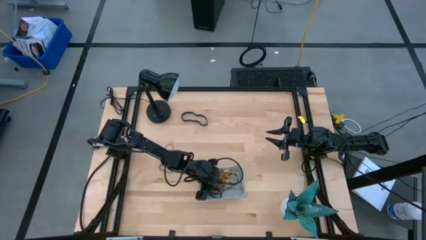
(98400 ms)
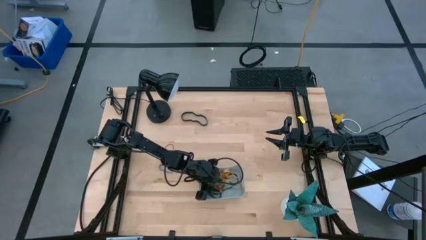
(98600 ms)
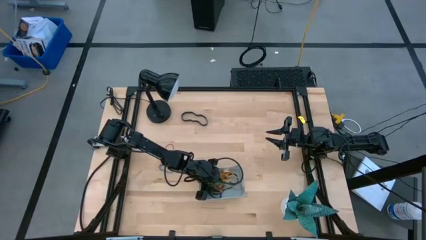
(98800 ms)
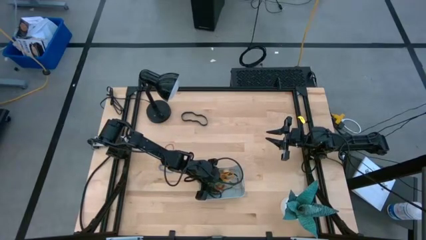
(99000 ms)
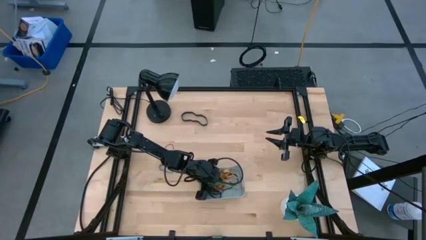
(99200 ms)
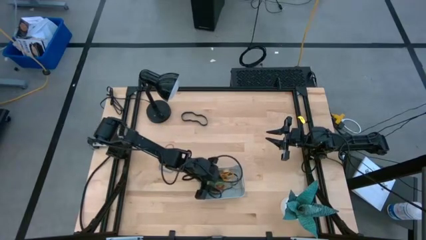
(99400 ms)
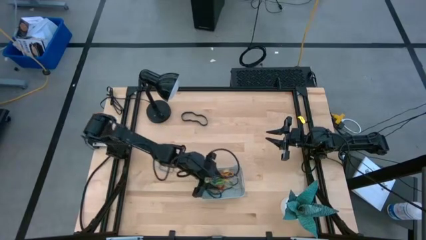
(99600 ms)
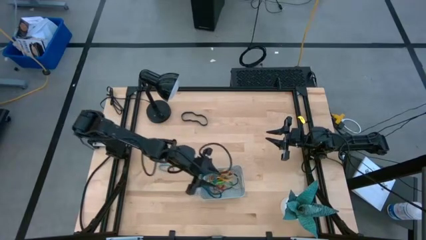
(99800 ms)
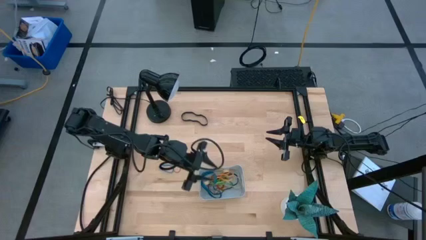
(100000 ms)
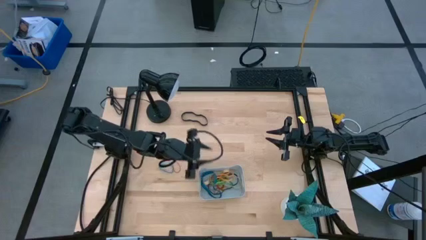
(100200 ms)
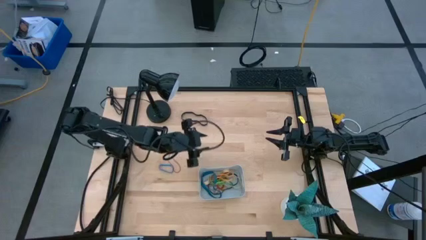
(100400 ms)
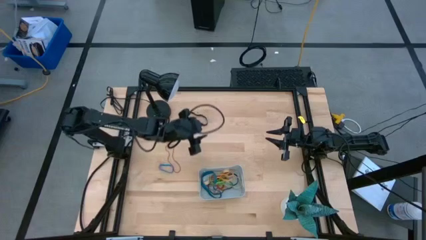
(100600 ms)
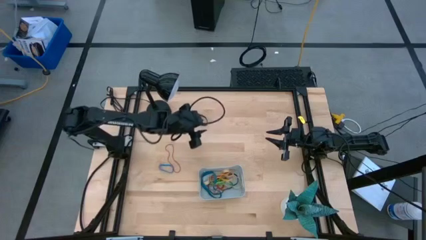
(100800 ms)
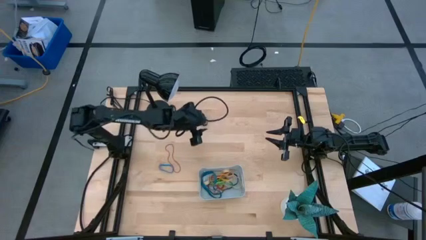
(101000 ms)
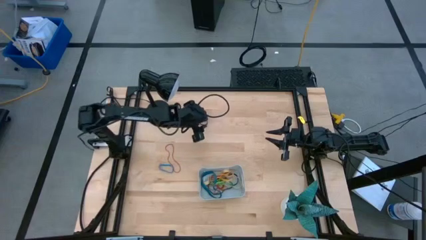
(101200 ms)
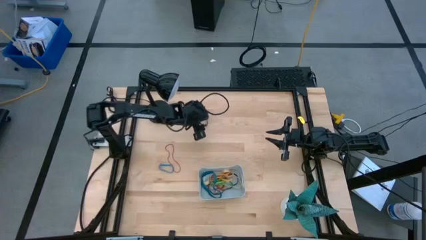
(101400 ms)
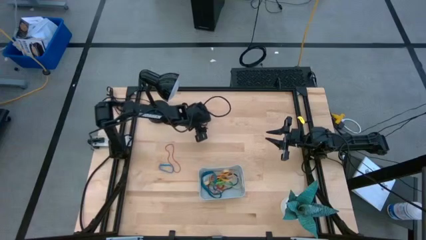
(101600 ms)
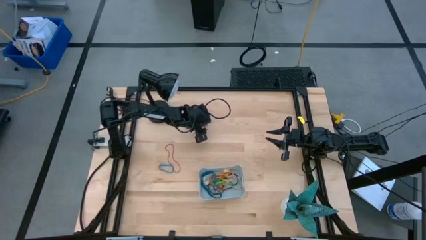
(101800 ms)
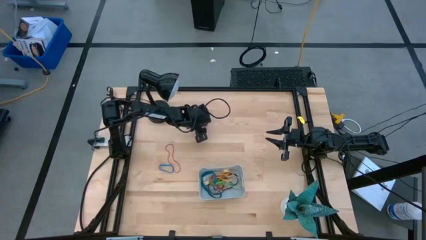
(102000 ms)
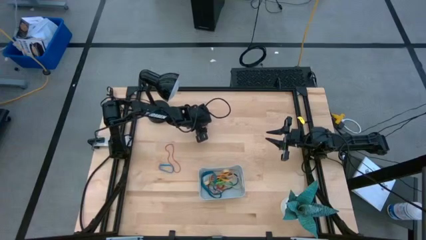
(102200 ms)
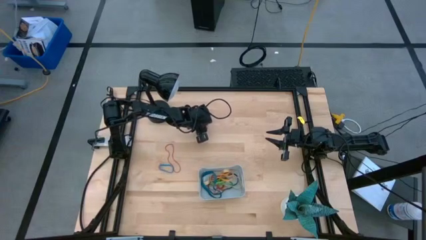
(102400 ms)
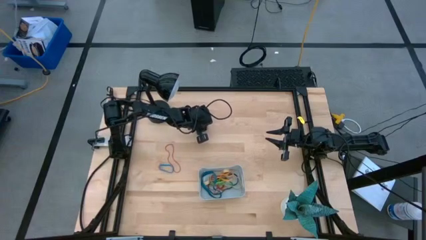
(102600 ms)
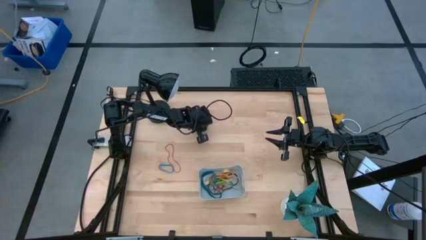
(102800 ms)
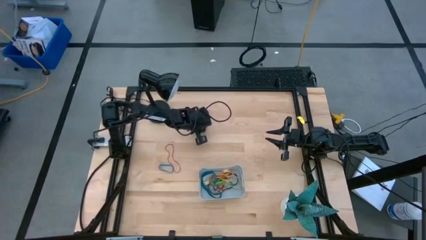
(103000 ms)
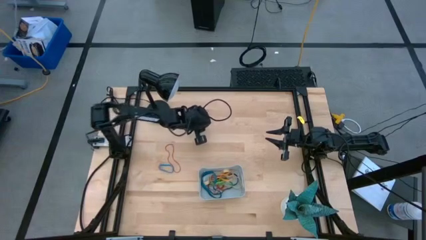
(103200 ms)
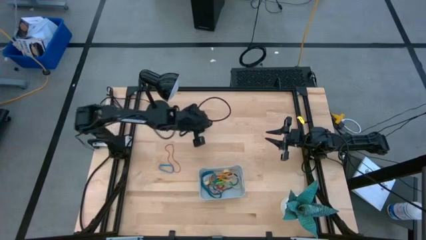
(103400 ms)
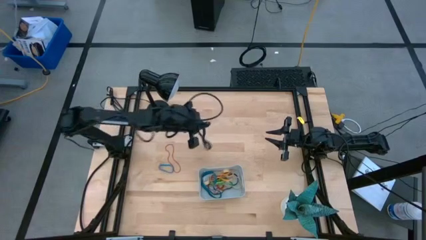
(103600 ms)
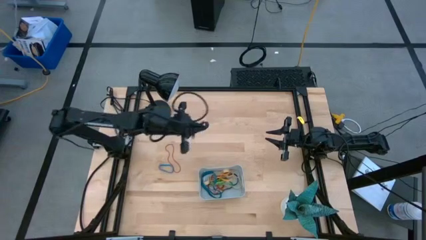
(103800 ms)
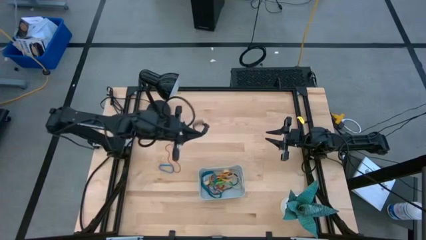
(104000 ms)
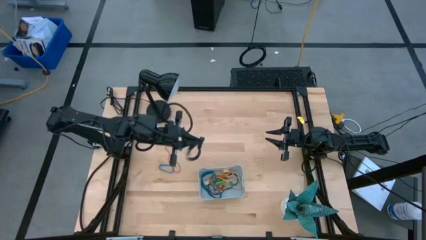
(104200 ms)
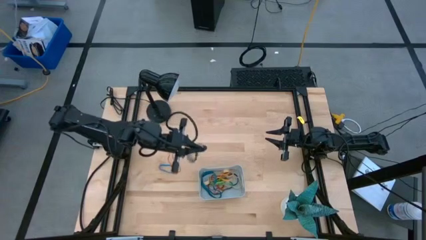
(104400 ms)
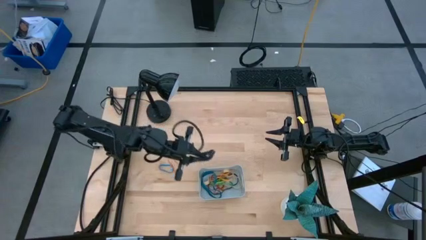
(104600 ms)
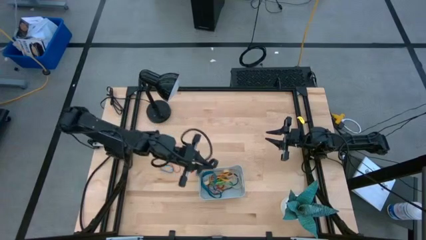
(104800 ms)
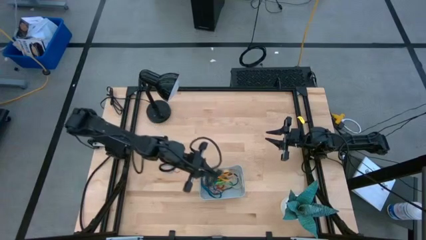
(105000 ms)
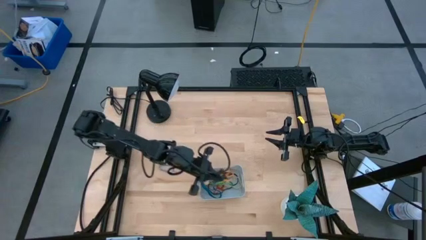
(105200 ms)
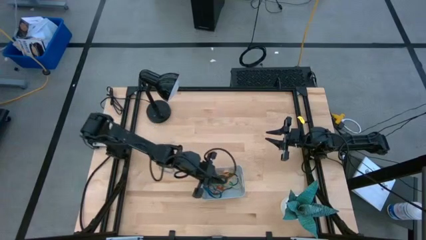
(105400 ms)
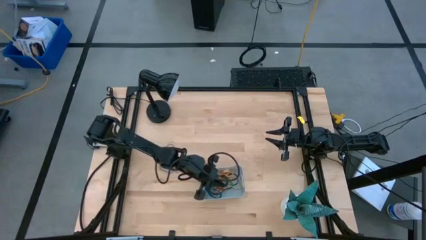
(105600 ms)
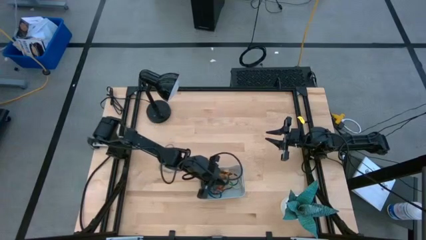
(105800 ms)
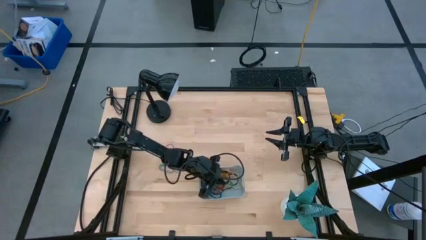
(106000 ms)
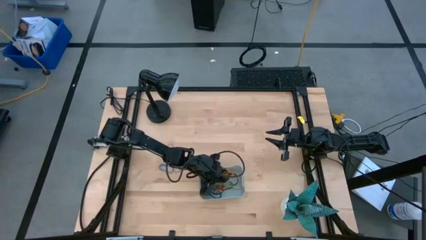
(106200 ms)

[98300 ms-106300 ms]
Task: Pick and place rubber bands into bin
Put the black rubber band into the gray bin

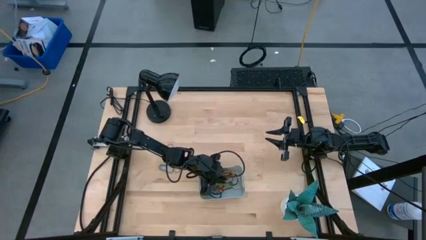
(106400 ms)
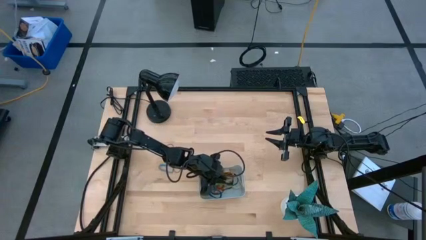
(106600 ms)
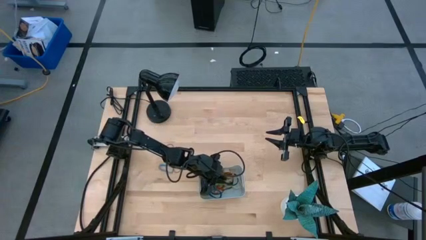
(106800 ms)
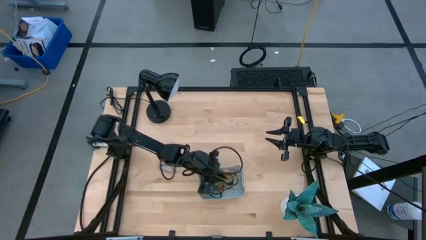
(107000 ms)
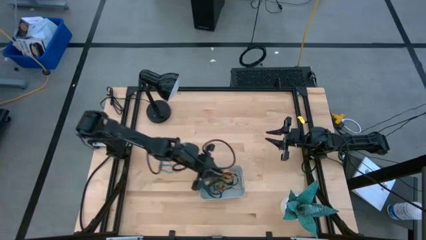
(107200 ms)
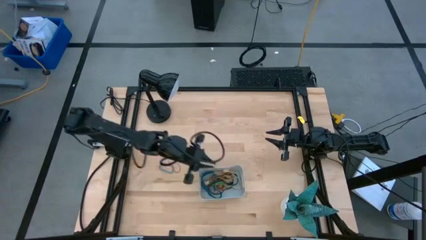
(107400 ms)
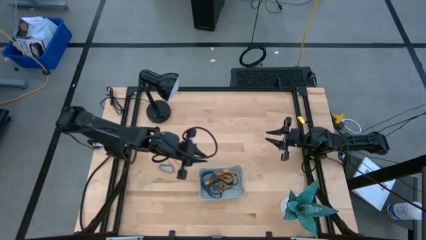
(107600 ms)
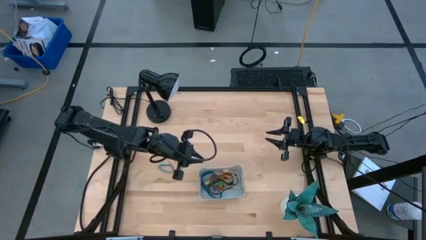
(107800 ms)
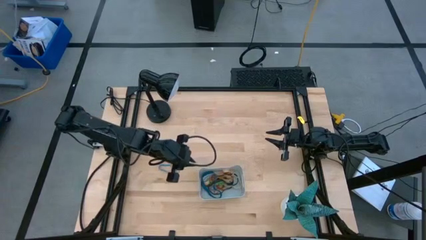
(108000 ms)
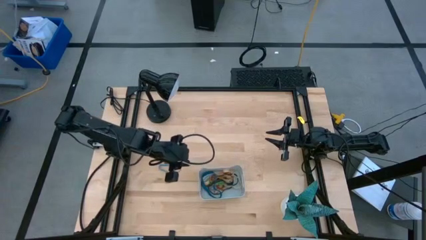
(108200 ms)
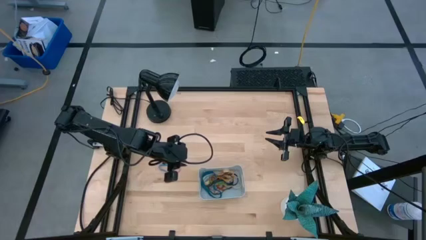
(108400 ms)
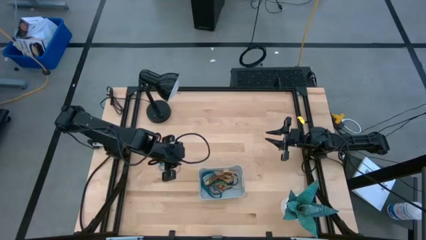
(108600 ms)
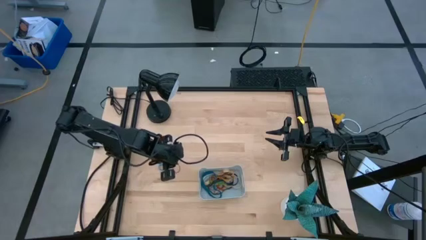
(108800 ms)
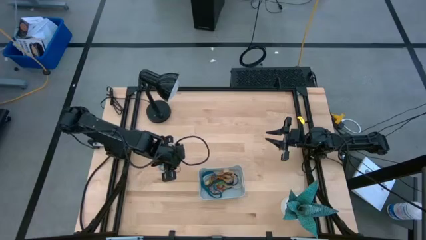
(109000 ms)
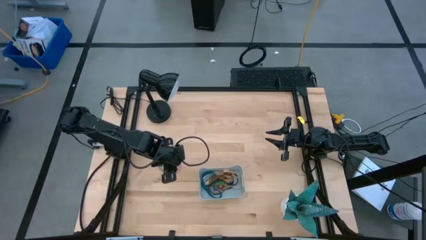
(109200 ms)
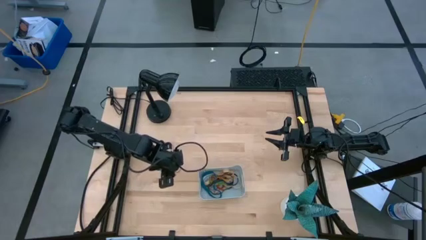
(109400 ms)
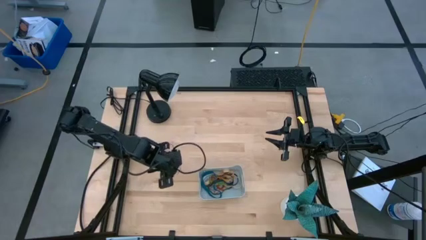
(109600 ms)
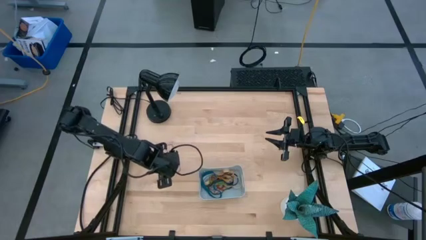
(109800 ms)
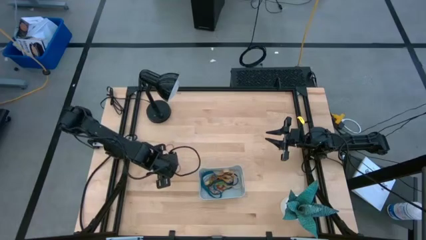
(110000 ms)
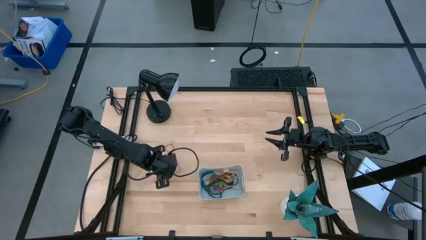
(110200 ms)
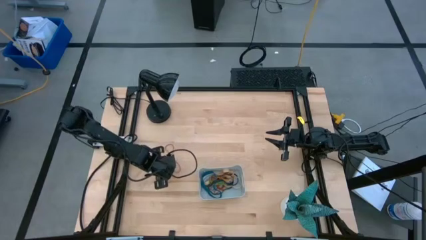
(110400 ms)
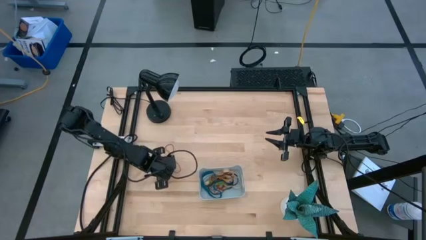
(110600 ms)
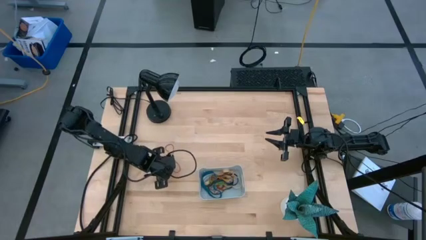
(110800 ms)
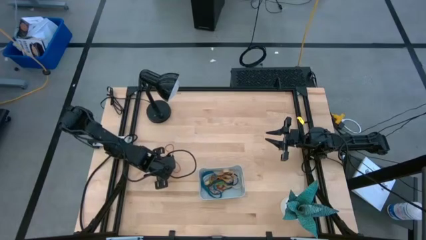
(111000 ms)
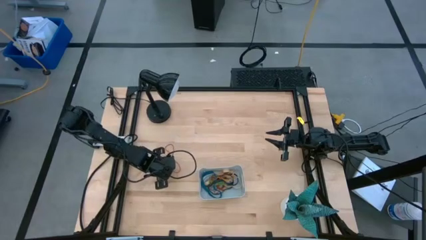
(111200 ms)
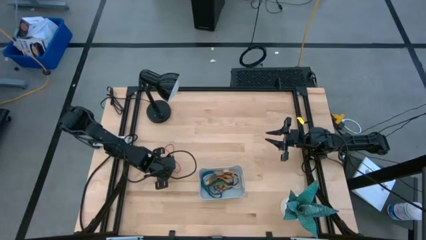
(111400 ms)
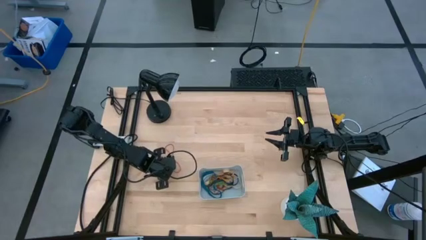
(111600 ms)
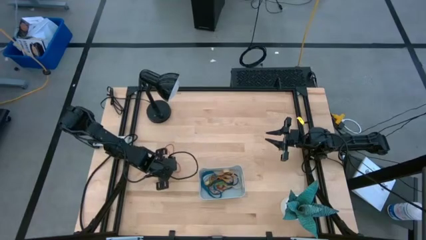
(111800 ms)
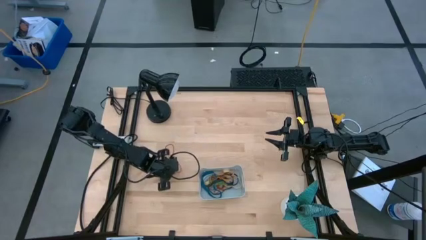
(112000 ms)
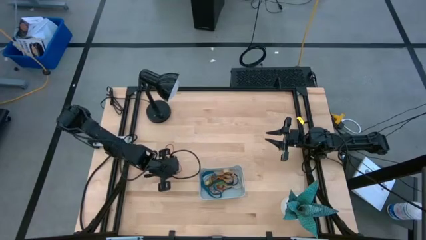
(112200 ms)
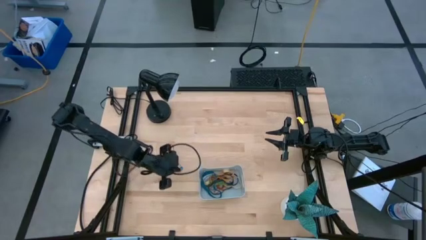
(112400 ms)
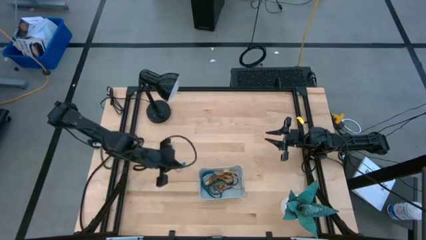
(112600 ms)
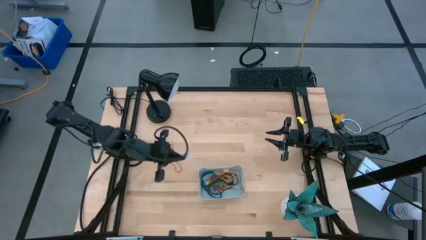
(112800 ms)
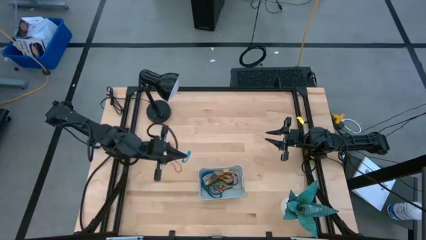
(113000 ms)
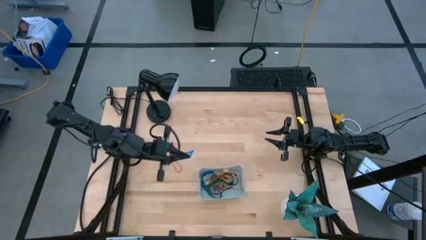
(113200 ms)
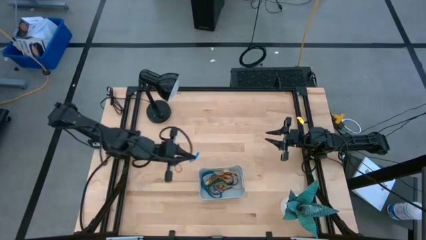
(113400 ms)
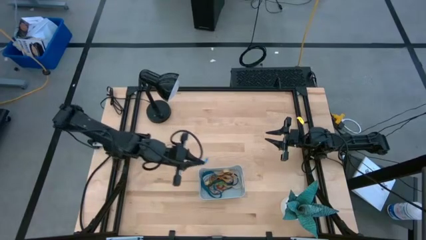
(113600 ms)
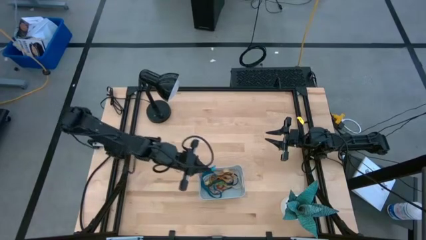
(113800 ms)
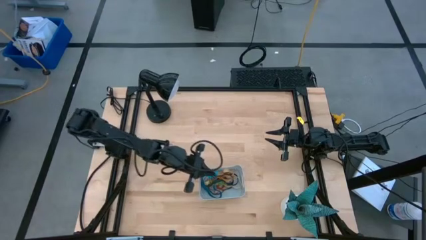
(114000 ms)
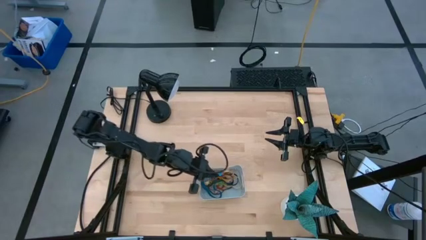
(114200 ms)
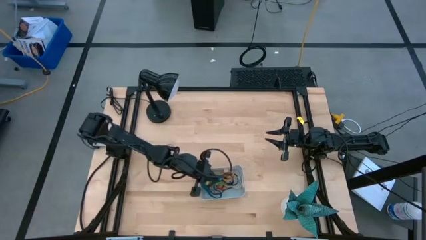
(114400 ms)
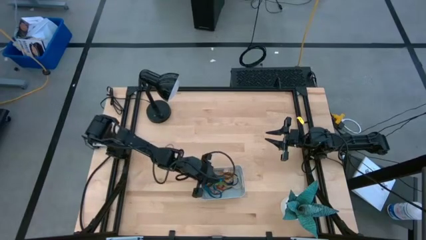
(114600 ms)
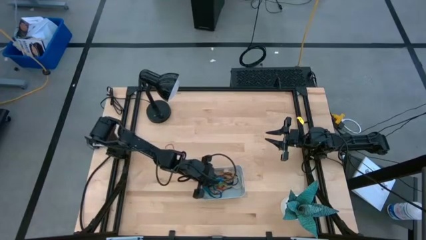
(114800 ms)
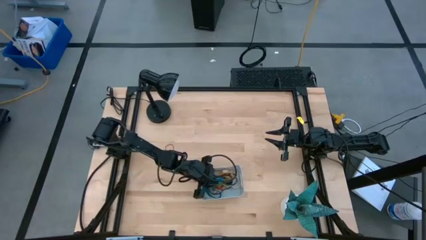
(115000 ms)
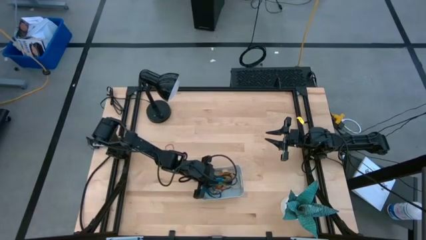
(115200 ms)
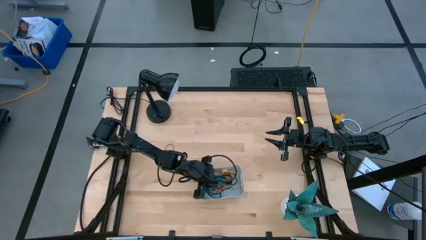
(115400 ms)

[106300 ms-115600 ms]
Put the blue rubber band into the gray bin

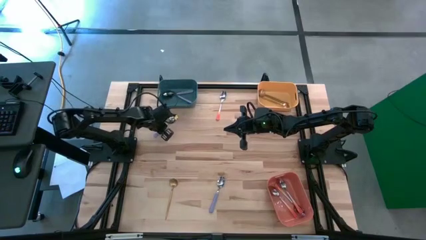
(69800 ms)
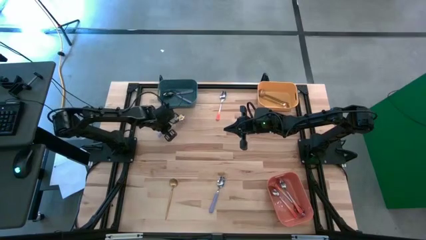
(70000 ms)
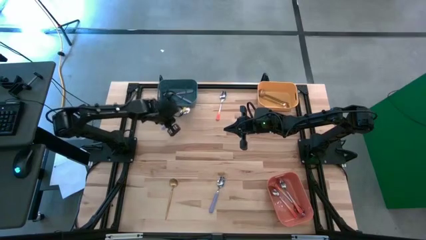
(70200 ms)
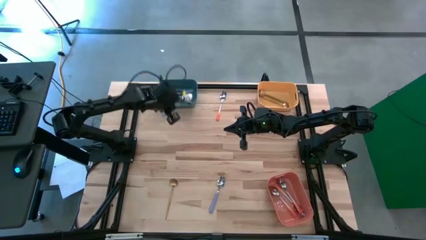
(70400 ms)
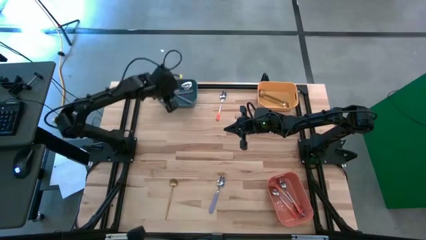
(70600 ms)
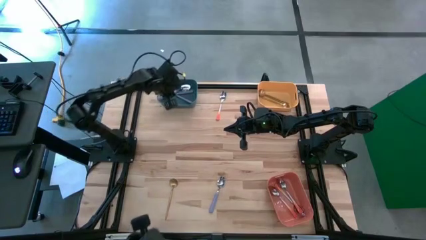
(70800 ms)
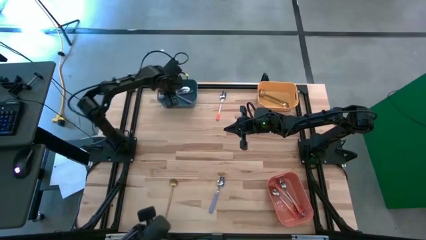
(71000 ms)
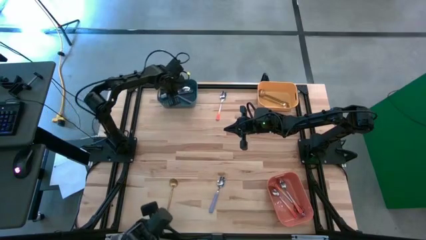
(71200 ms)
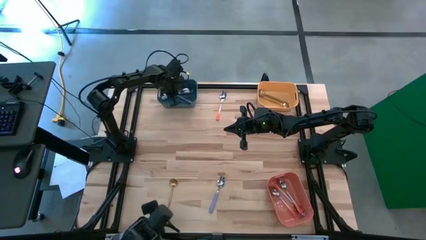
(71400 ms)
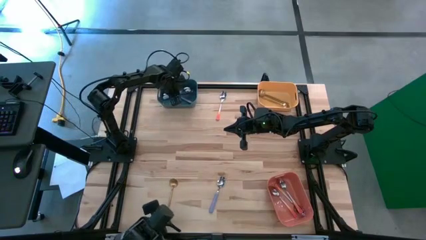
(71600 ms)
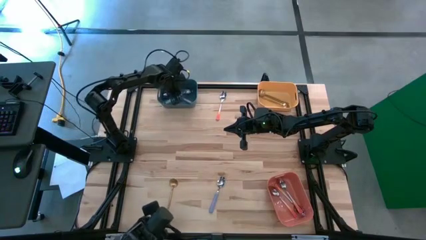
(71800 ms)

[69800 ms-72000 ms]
Task: Sort silverware by color (type)
Put the left violet spoon into the dark green bin
